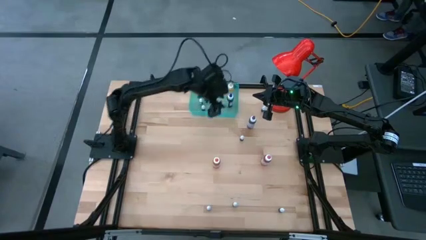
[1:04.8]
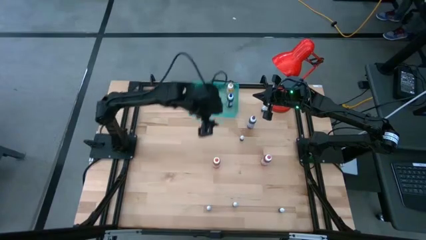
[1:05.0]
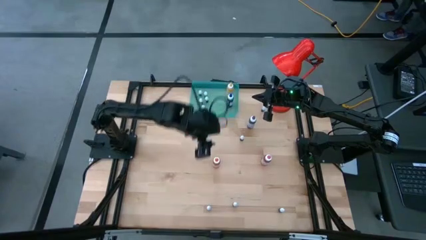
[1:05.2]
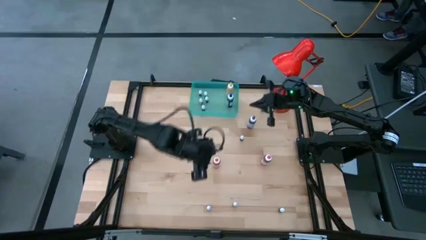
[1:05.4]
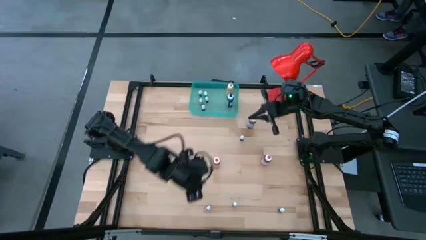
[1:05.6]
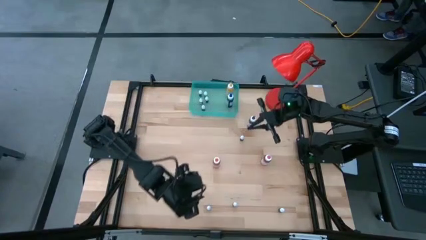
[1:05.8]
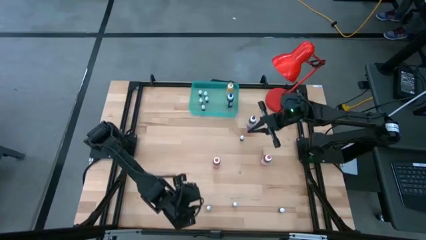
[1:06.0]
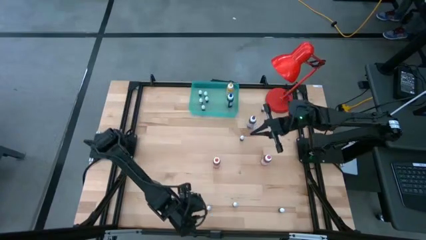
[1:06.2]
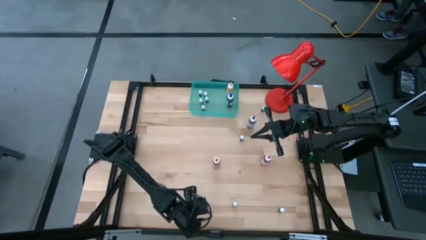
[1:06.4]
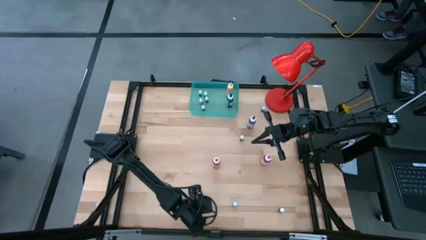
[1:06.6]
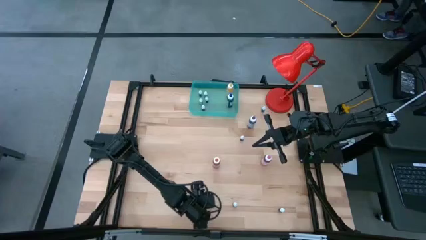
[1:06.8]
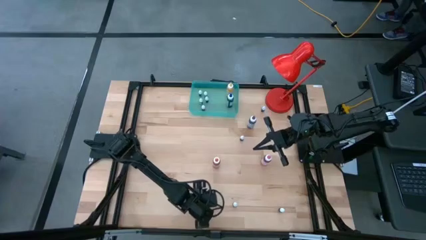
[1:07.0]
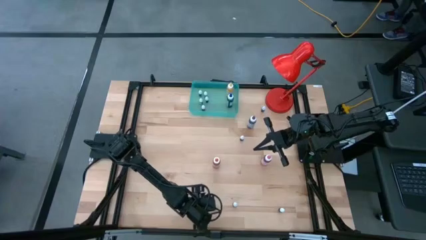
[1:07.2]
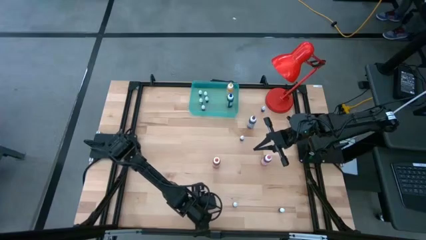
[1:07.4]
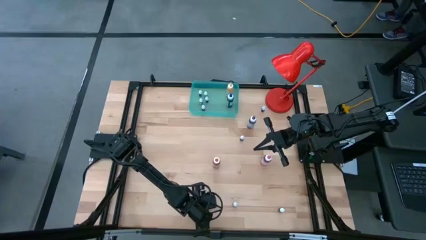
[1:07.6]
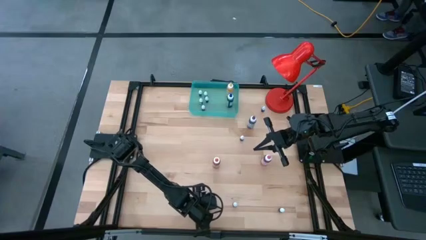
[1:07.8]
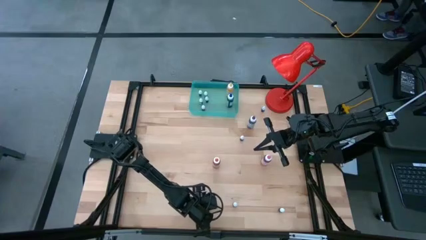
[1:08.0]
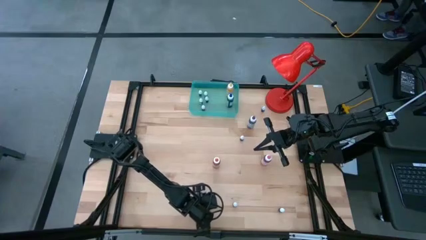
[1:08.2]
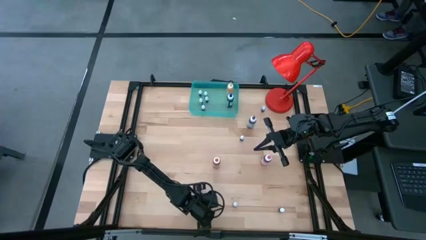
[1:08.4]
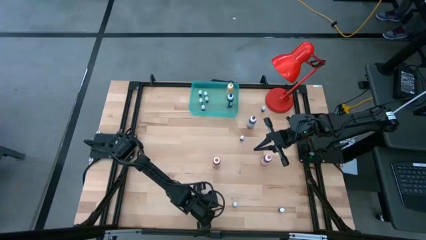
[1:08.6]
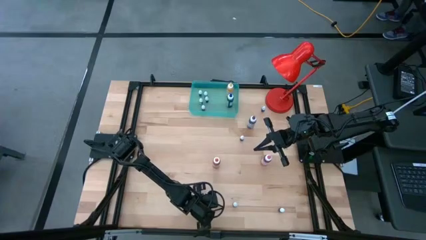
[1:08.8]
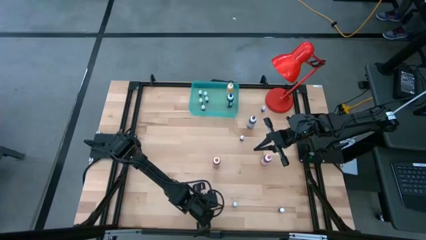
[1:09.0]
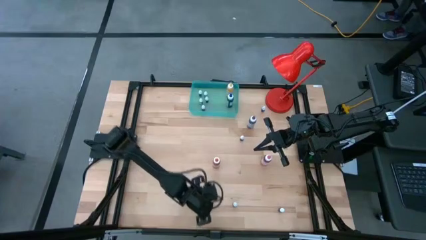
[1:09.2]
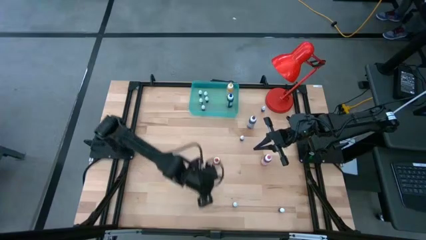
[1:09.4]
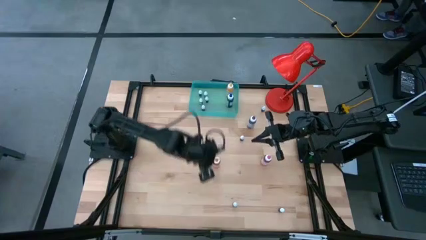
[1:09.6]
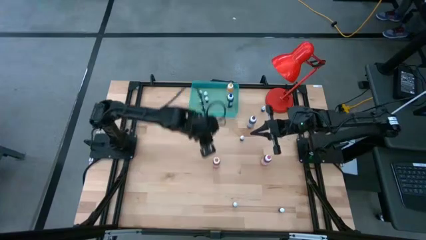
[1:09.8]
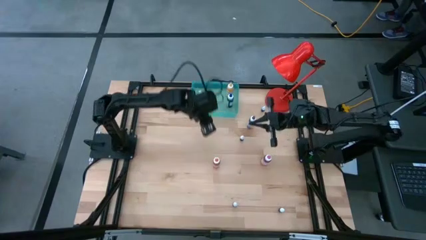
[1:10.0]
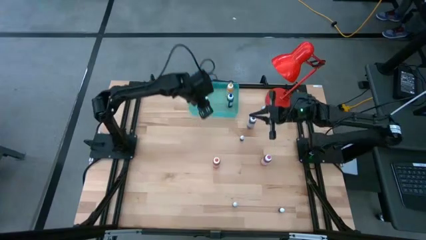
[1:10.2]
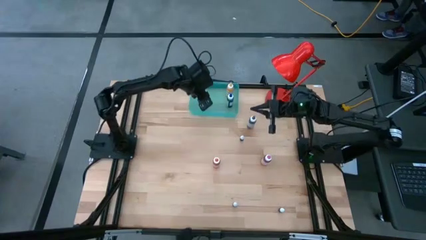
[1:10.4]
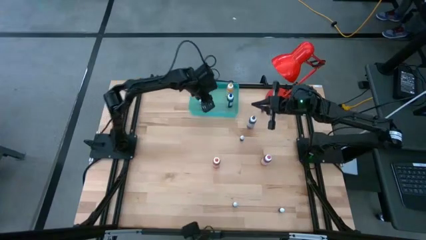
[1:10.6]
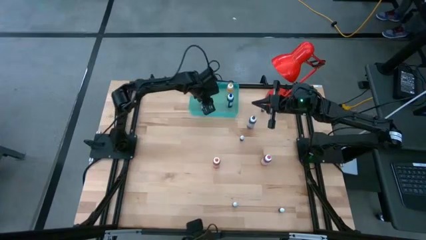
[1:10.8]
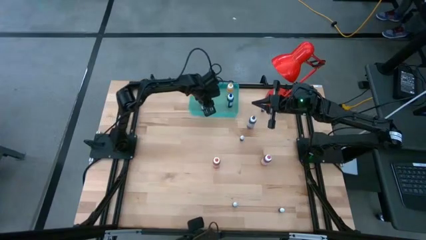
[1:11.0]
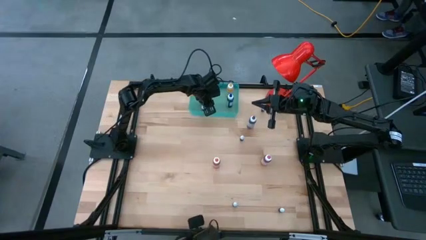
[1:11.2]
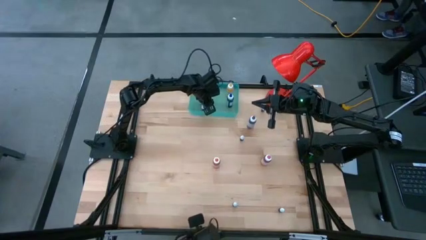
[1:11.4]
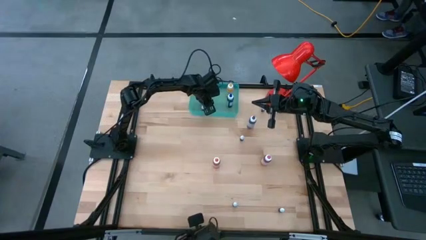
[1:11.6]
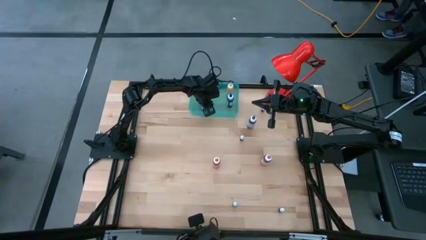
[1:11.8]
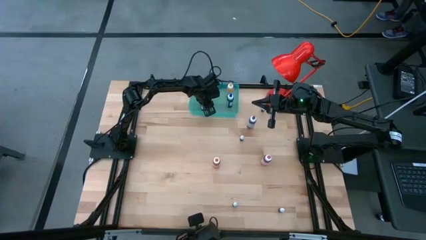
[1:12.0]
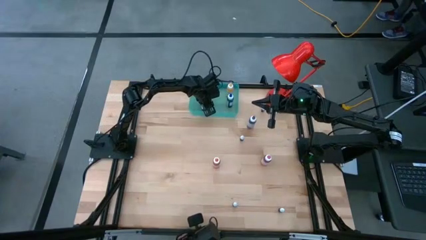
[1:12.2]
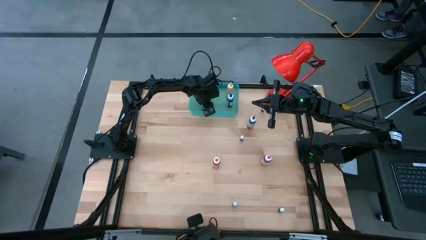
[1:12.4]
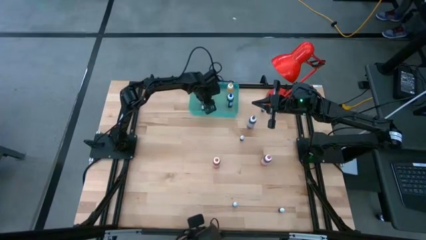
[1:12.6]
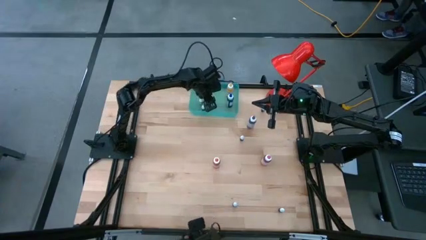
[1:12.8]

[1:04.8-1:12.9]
Task: Pick & Place food coloring
Put the red food coloring bottle into the bin

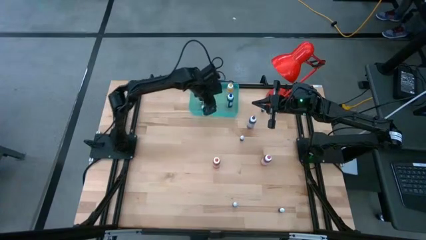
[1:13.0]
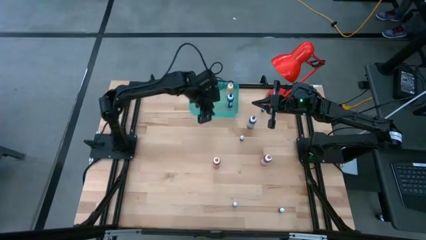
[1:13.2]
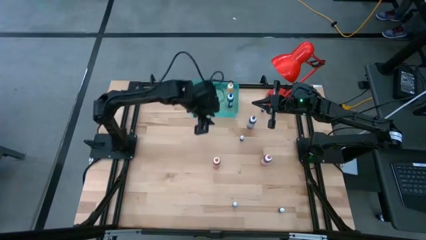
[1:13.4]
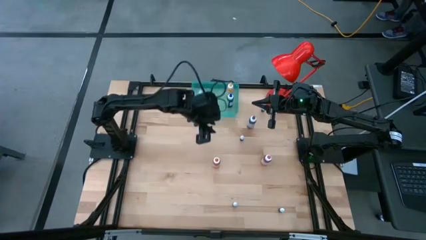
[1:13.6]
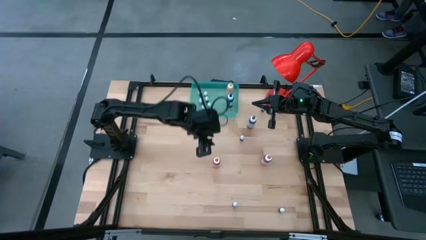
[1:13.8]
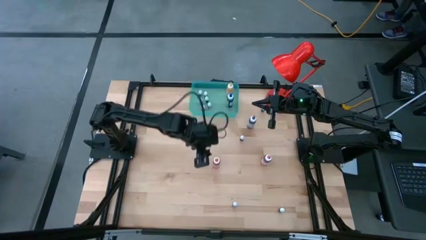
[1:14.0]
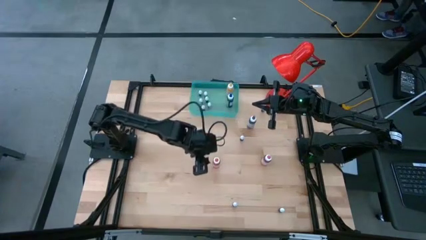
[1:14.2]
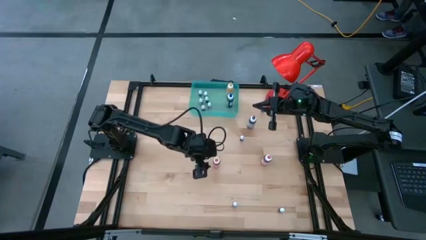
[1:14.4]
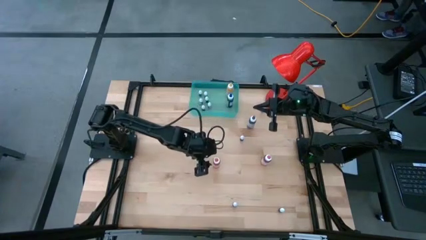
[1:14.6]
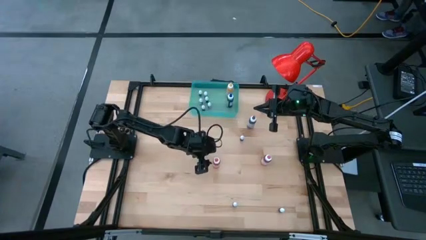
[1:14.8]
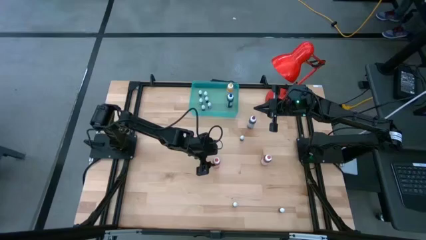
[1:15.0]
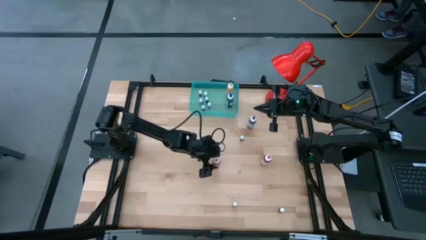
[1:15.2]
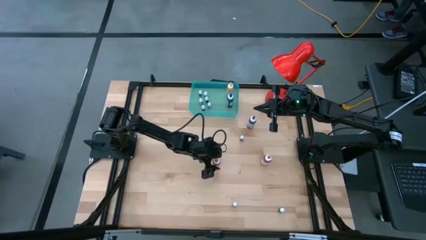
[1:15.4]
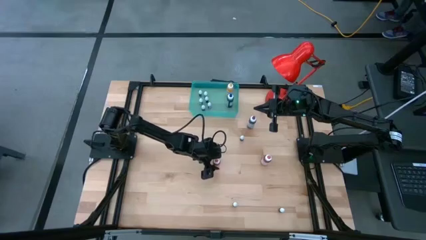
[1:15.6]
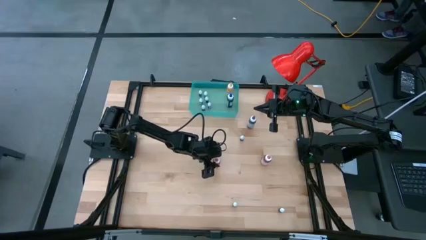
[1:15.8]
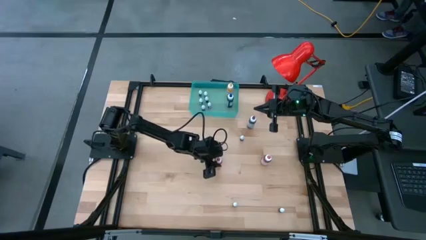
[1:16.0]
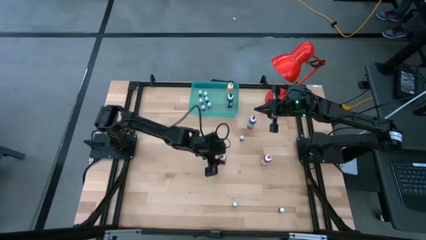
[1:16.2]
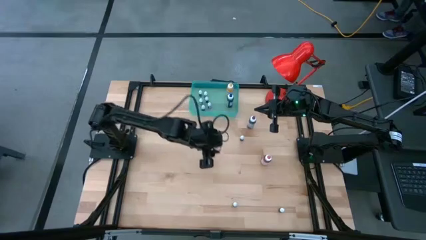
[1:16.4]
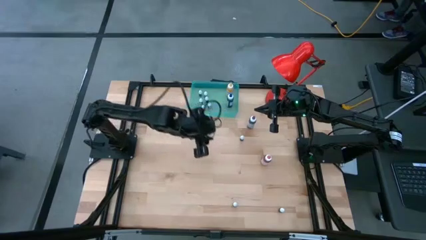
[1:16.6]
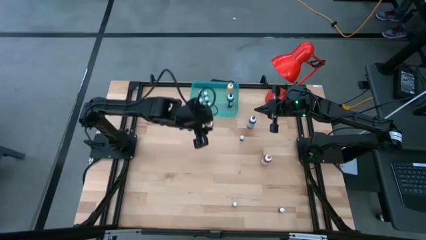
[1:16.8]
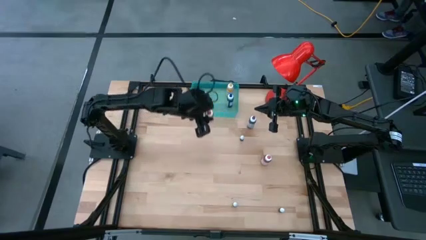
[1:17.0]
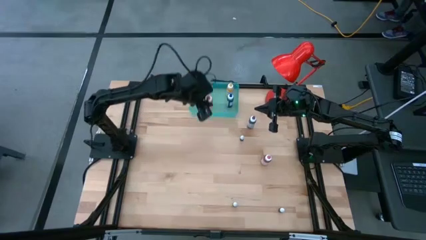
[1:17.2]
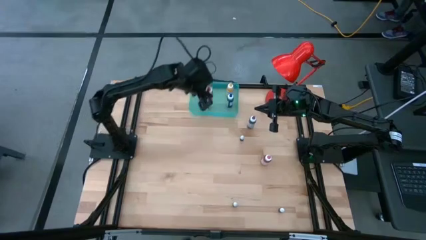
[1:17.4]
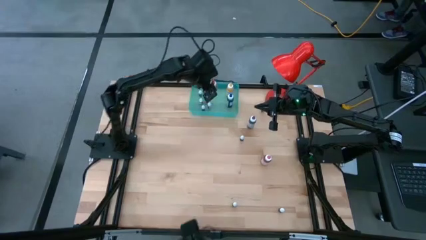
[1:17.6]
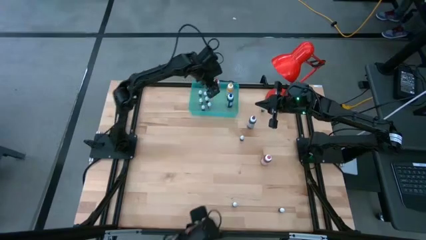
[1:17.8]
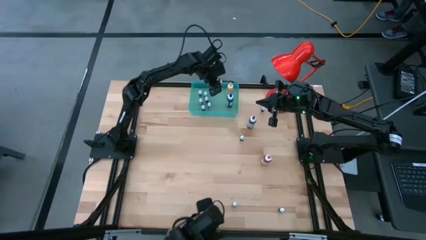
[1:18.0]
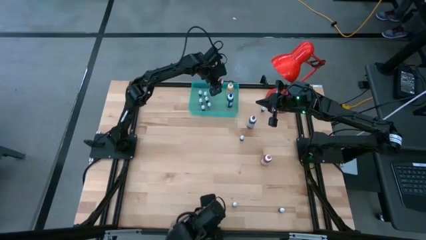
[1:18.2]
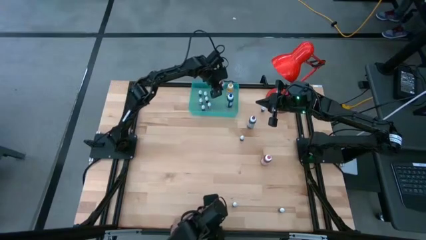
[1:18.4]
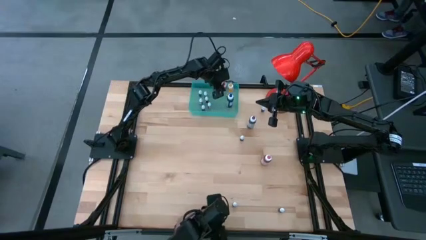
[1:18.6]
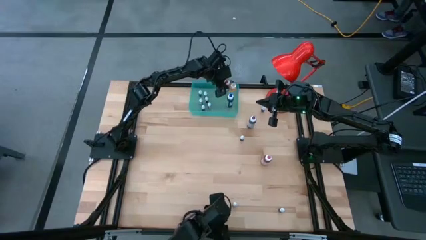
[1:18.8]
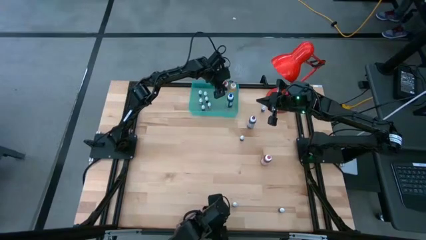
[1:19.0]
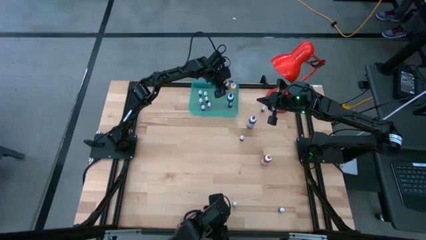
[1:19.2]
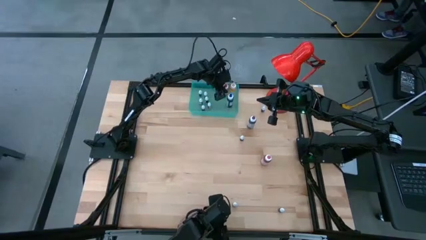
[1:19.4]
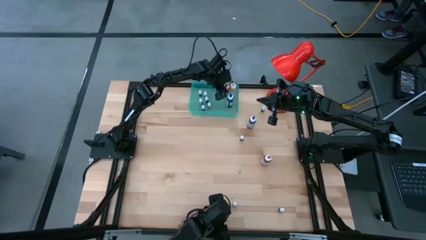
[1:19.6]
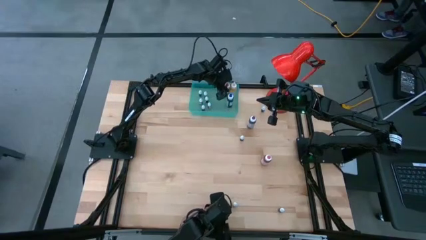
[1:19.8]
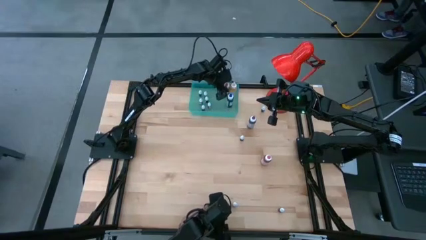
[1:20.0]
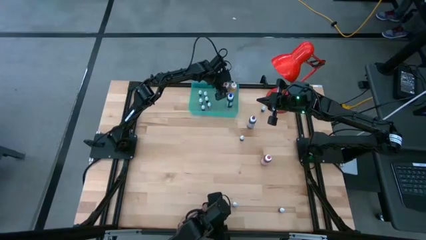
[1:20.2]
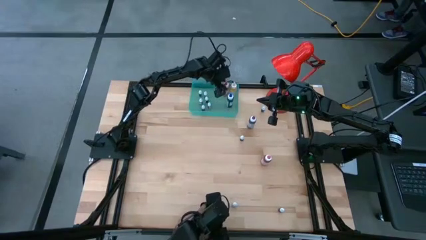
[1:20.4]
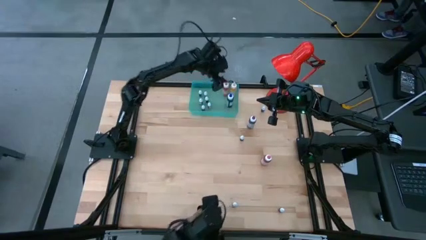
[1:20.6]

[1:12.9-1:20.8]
Put the orange food coloring bottle into the bin

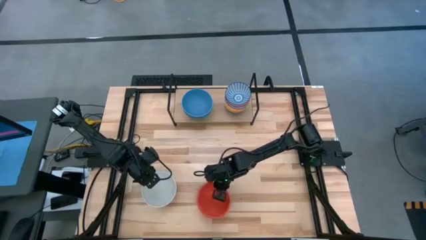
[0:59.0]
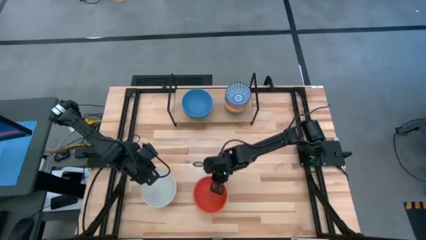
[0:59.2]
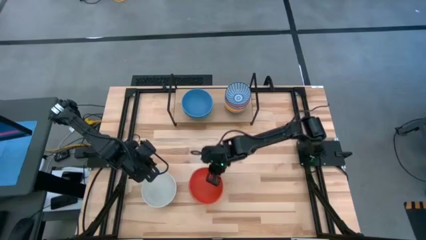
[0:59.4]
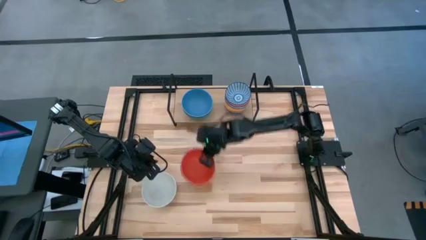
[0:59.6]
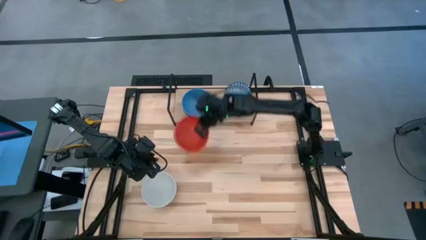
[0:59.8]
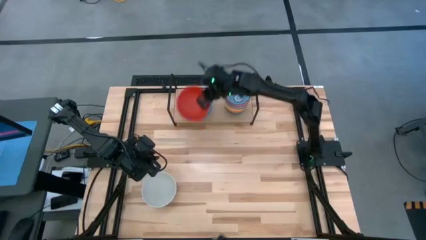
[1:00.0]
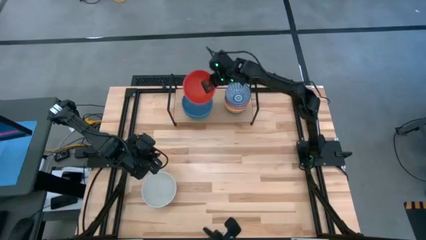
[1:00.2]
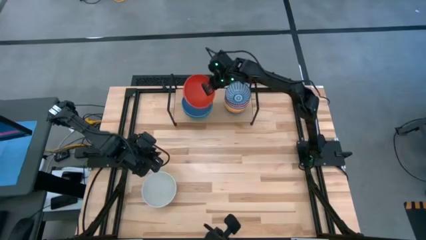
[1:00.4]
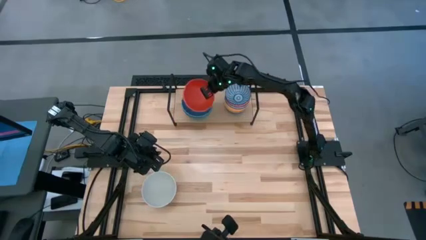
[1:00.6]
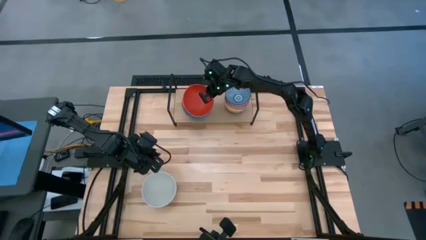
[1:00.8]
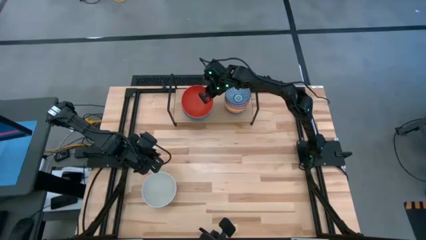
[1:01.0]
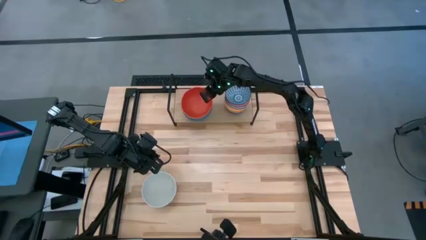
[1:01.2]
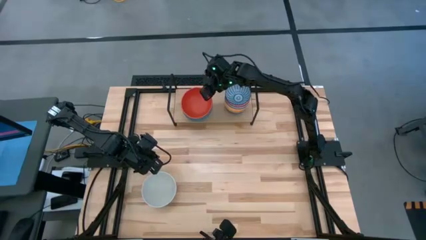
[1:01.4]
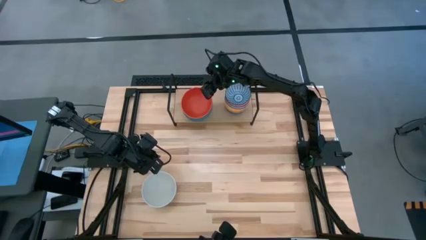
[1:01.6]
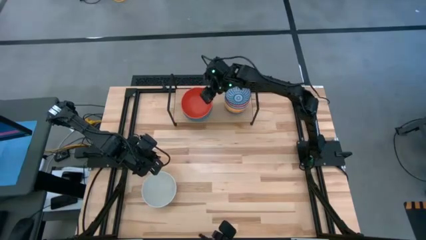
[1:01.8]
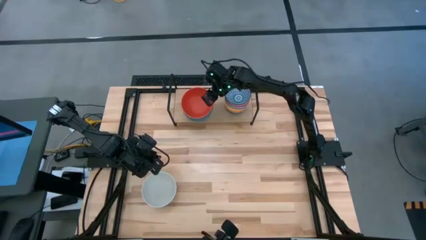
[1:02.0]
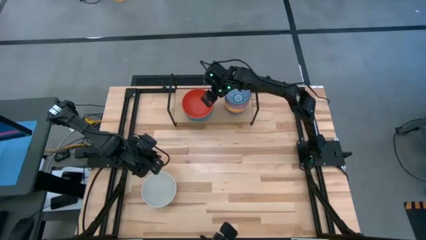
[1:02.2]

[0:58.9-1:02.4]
Task: Place and stack bowls onto a shelf
Stack the orange bowl on top of the blue bowl on the shelf
